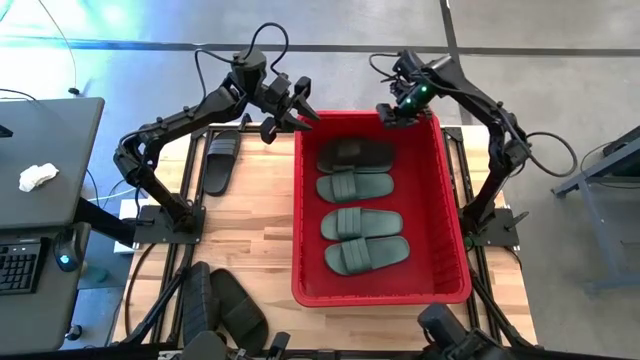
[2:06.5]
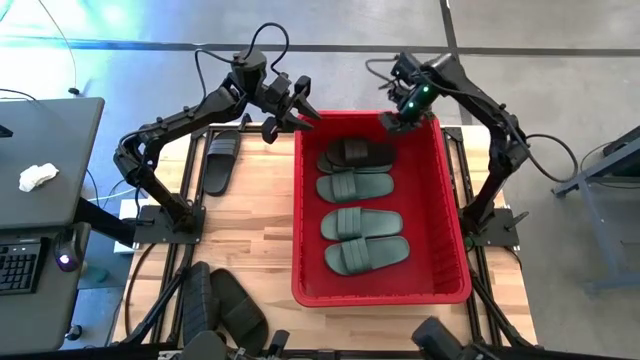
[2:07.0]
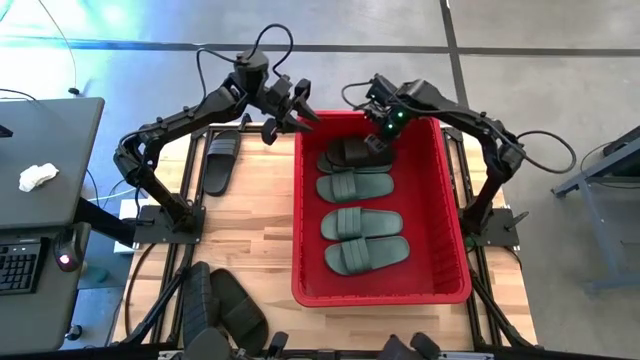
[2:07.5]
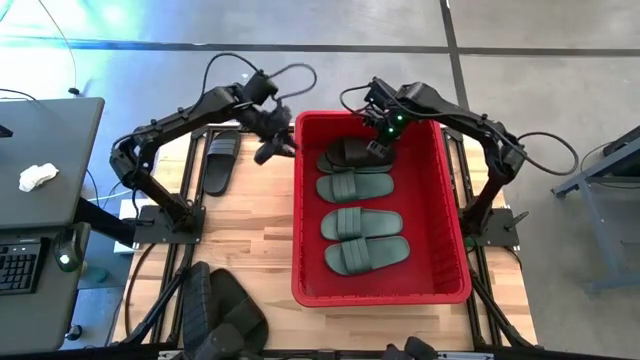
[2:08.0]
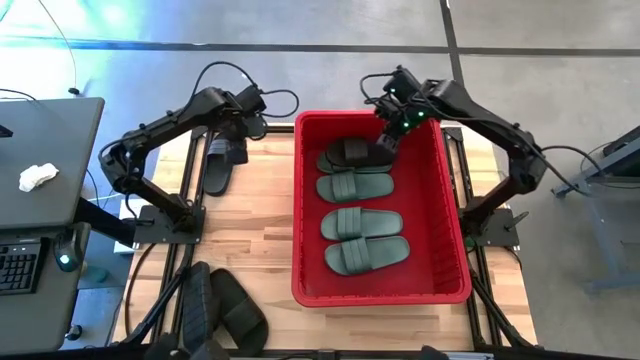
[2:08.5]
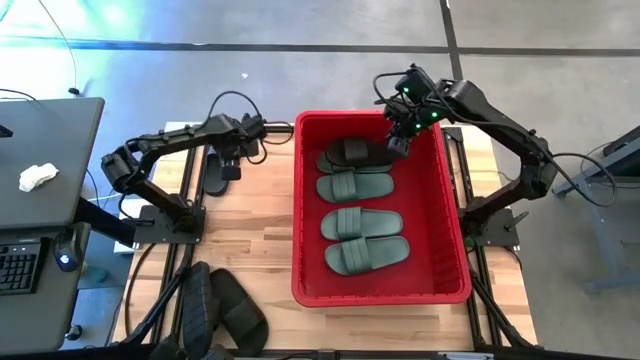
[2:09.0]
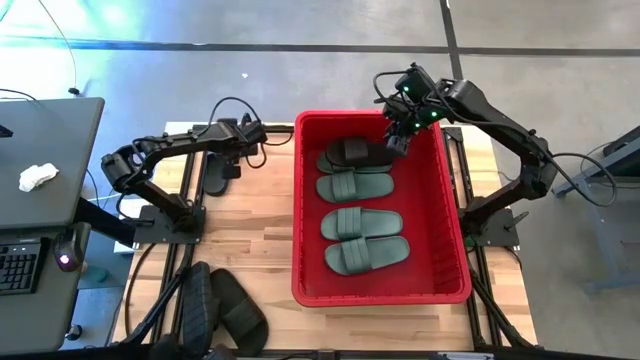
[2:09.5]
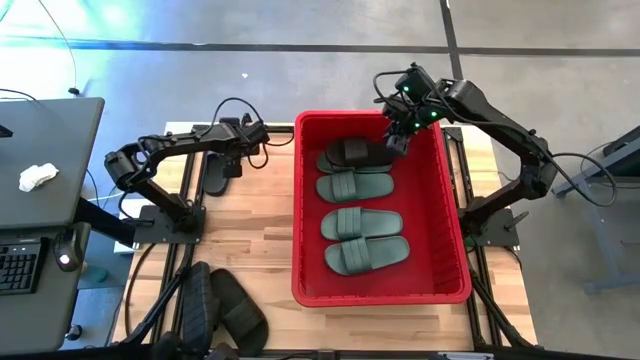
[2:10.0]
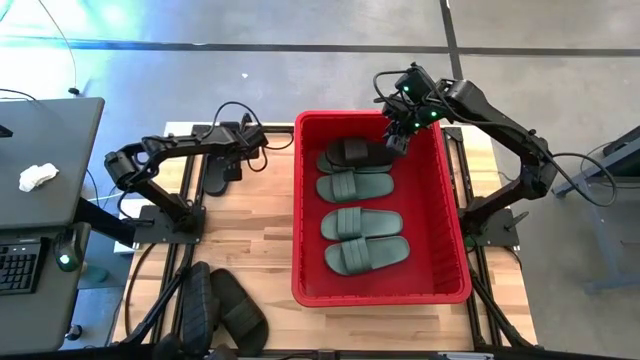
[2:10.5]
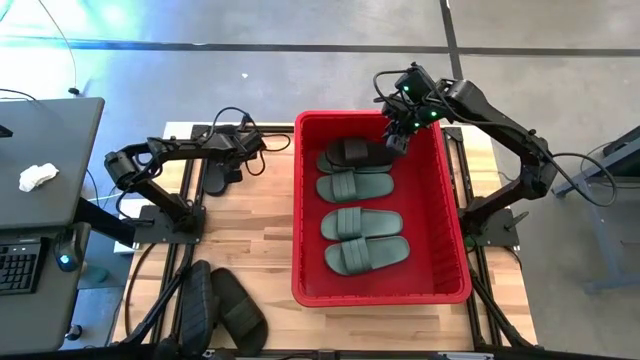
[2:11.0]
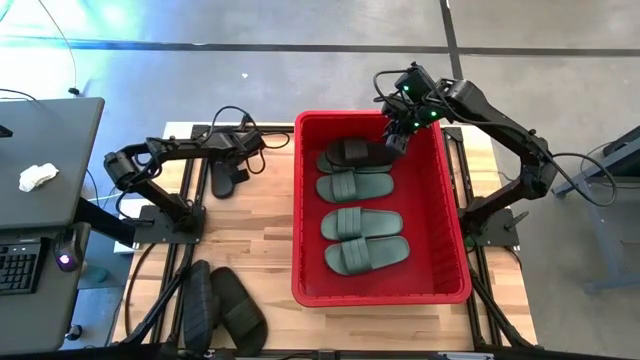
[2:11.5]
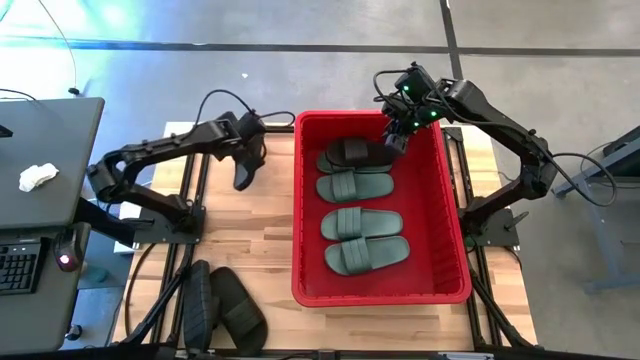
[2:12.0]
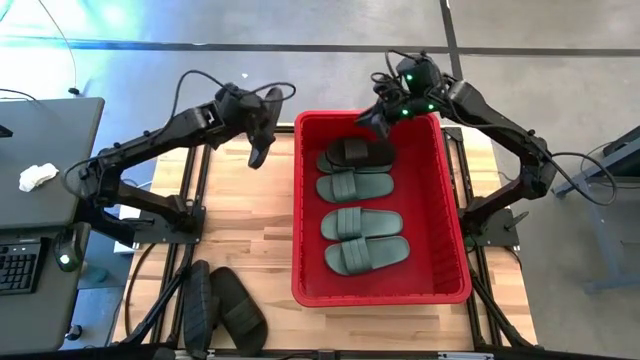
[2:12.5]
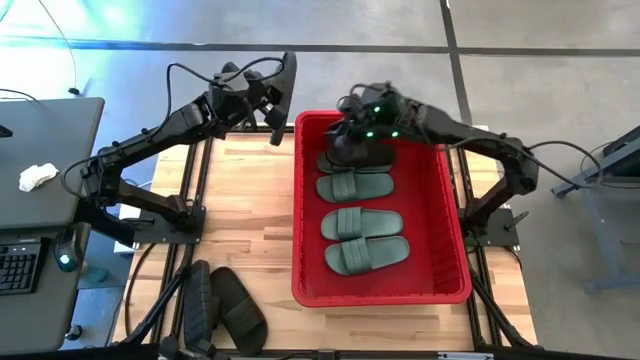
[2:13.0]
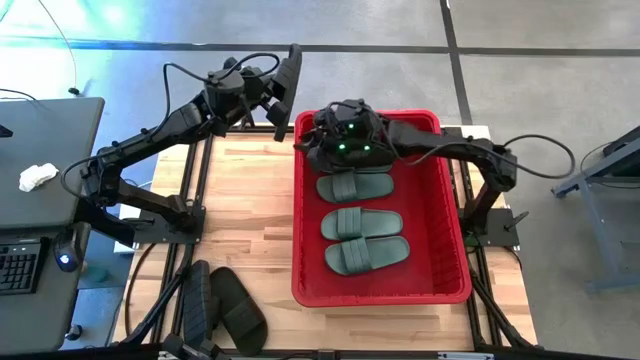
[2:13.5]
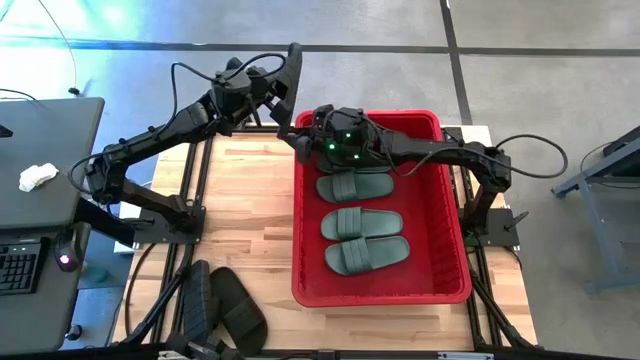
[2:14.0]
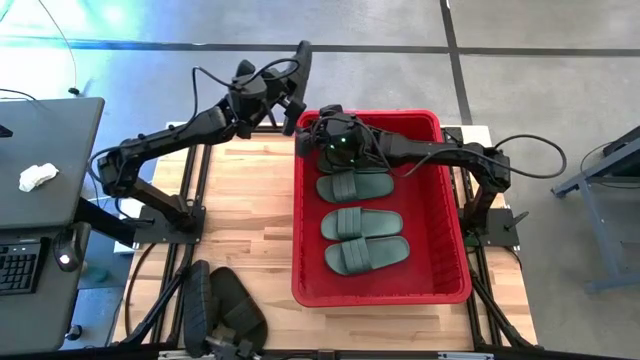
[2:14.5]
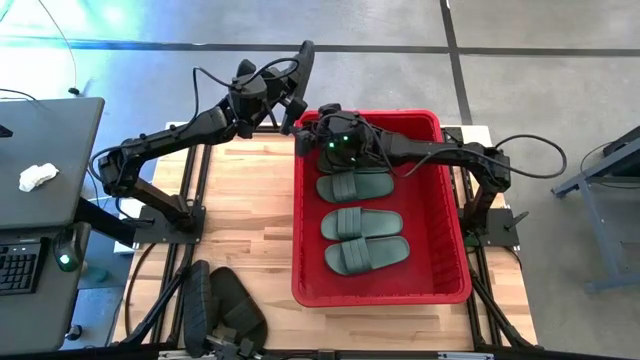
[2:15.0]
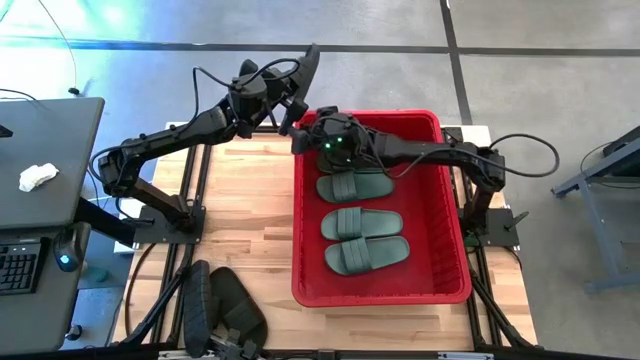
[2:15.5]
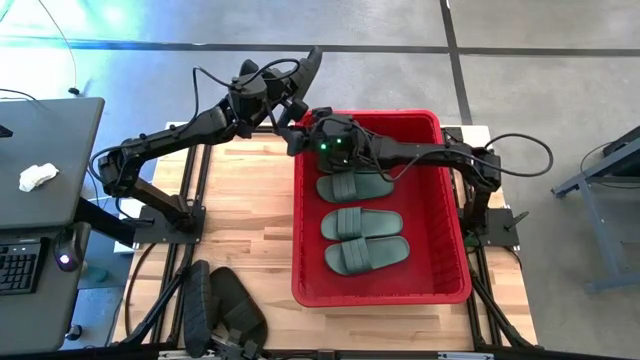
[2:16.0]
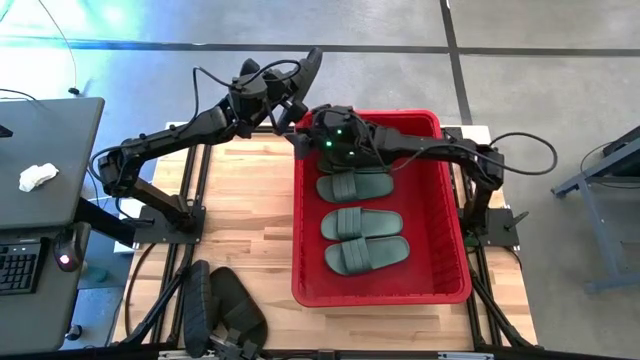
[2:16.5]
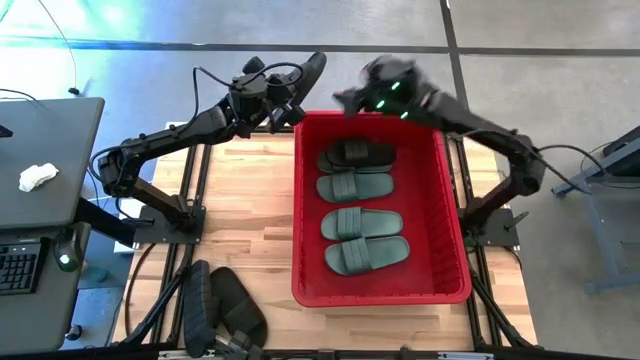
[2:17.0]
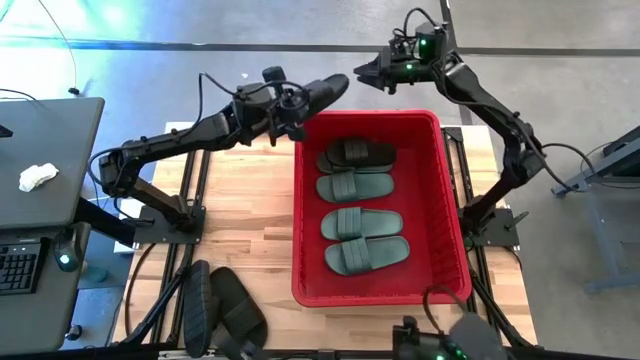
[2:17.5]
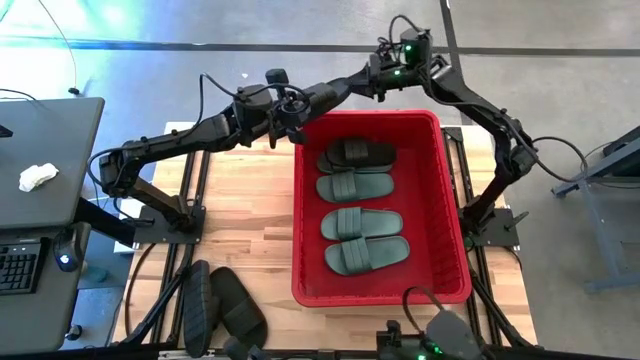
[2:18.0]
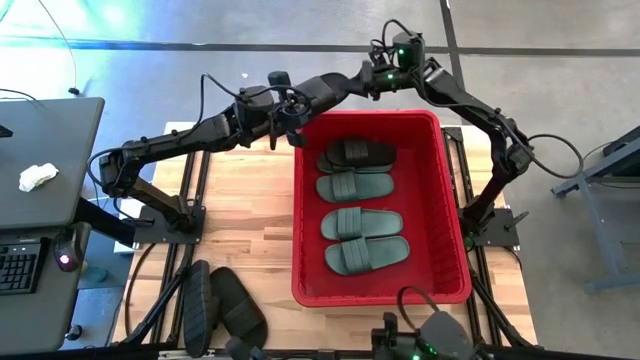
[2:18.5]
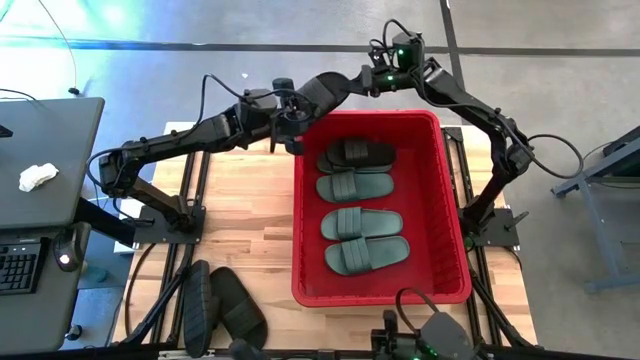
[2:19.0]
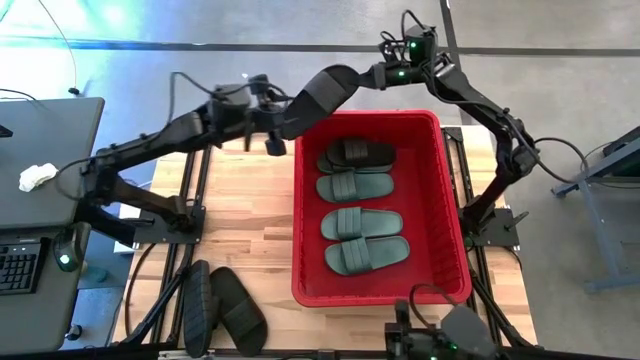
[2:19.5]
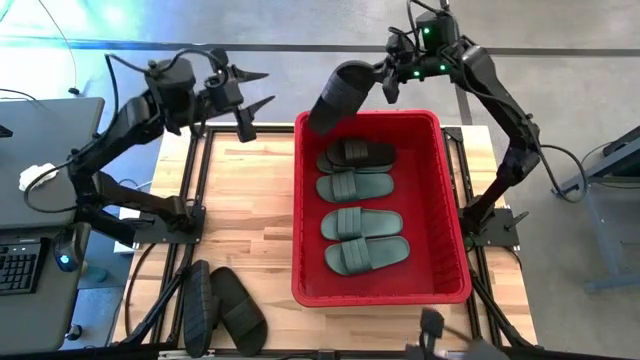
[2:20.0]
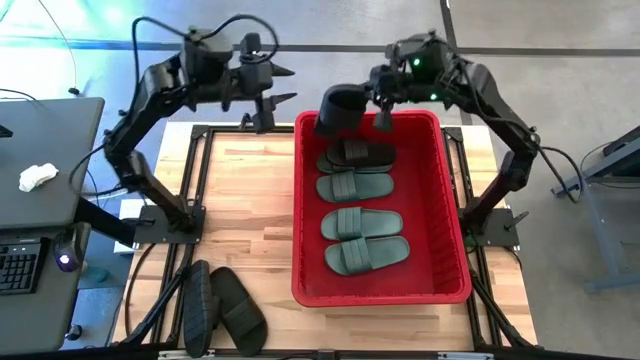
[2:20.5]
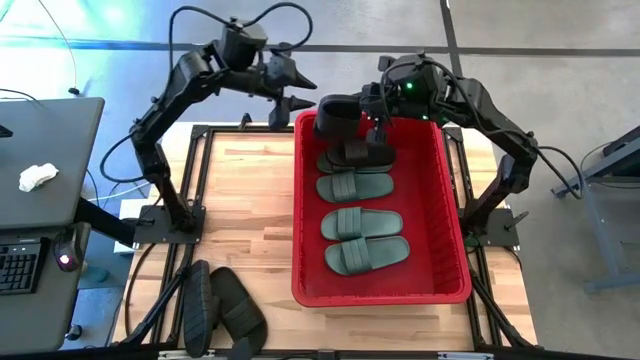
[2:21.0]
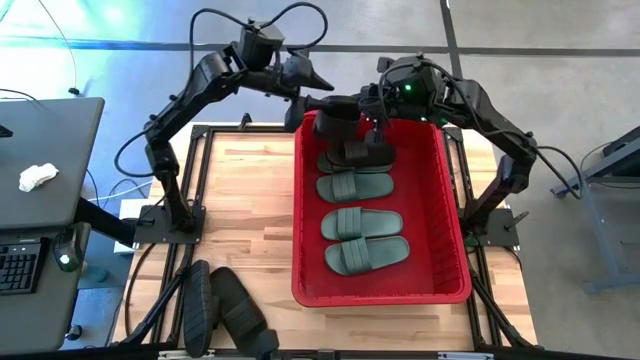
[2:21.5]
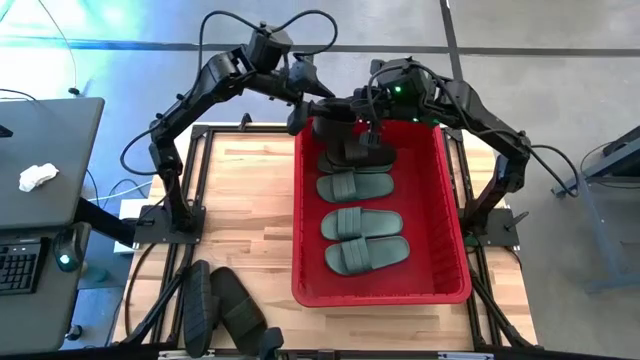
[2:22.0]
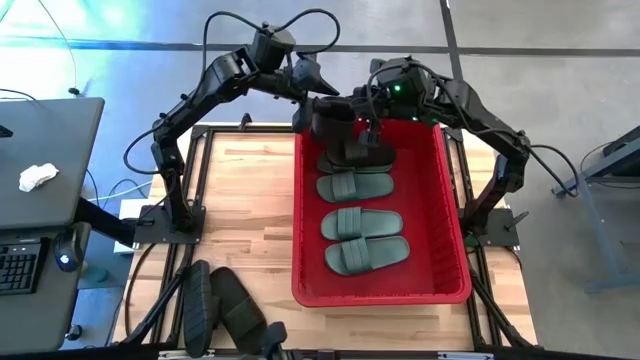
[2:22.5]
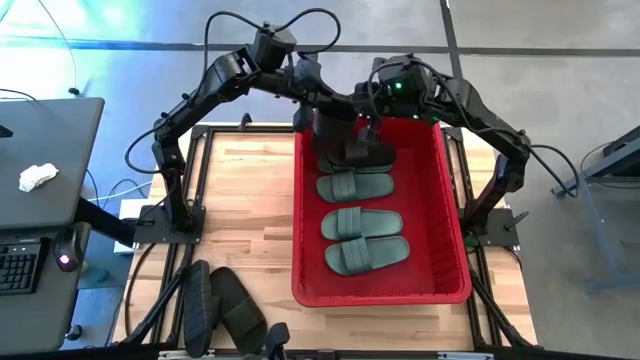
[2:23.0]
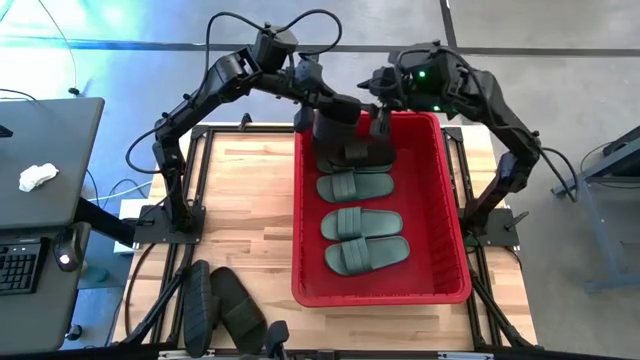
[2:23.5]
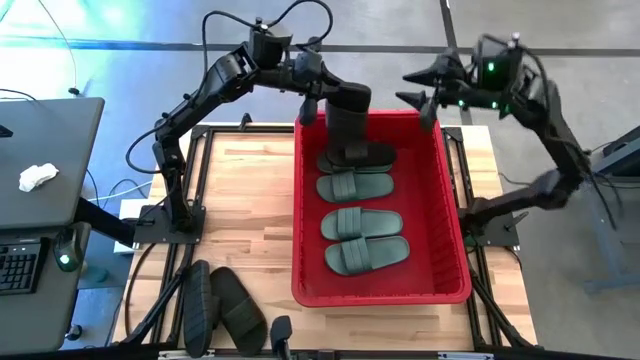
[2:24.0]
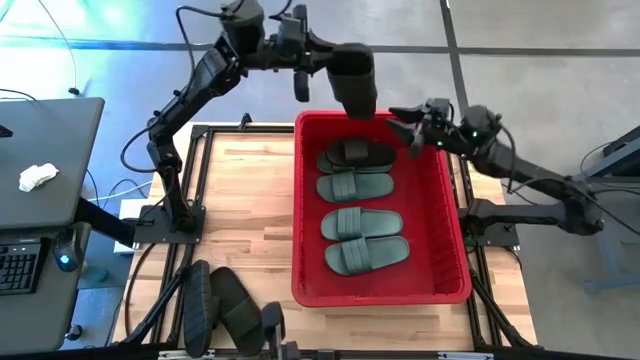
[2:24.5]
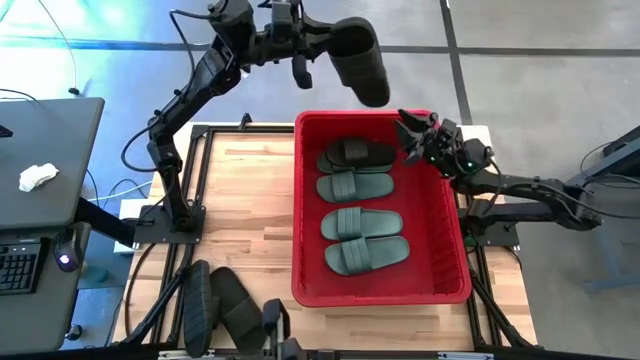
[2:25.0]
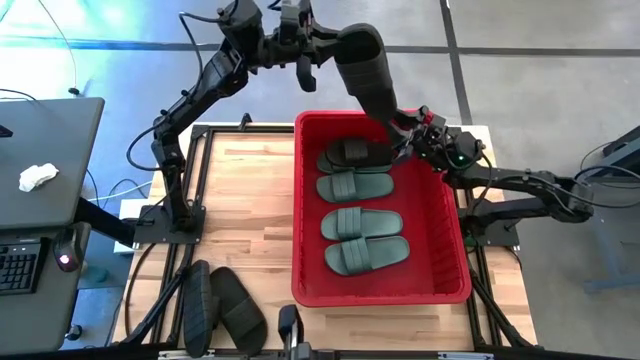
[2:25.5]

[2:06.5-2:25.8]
Task: Pick and place slides into bin
Put the black slide into the red container

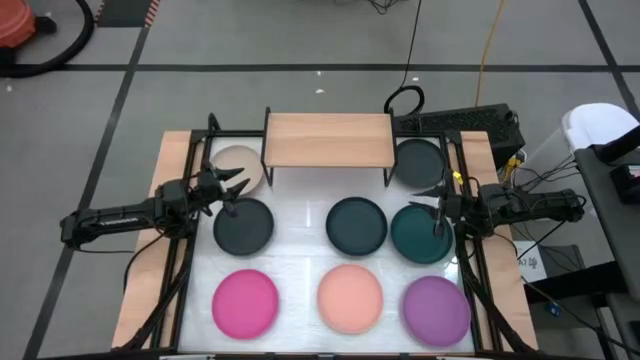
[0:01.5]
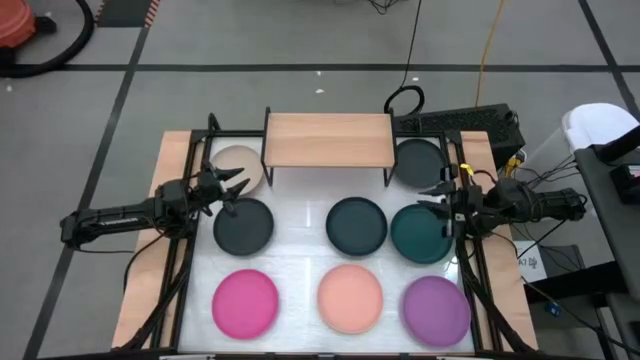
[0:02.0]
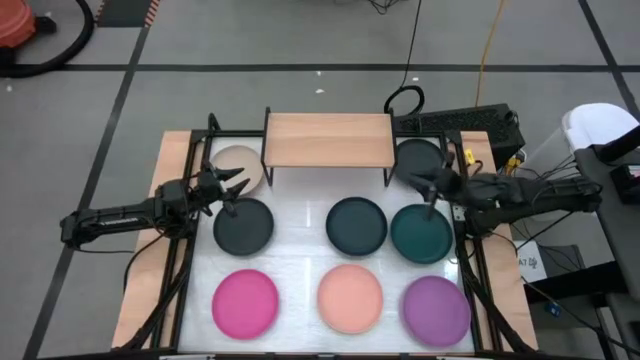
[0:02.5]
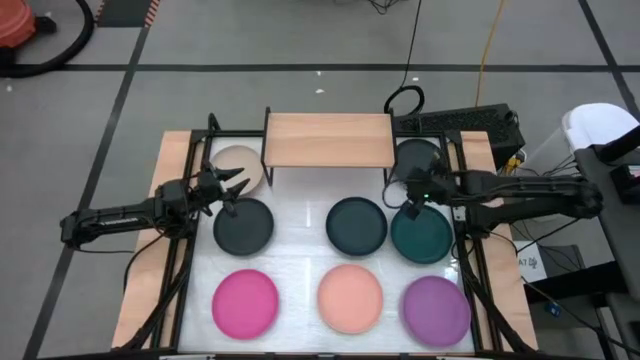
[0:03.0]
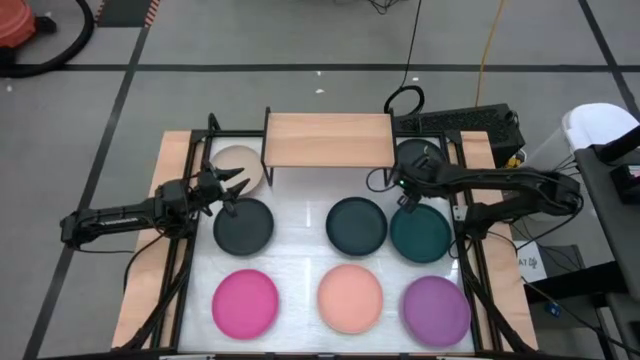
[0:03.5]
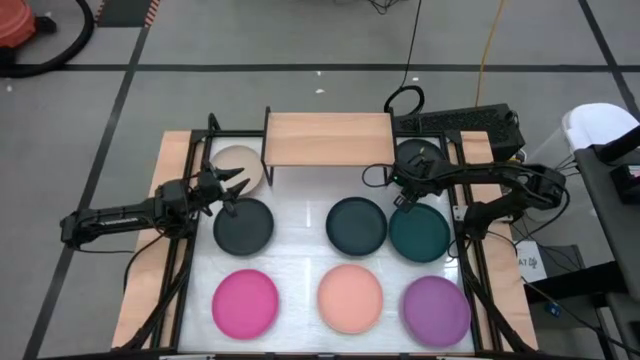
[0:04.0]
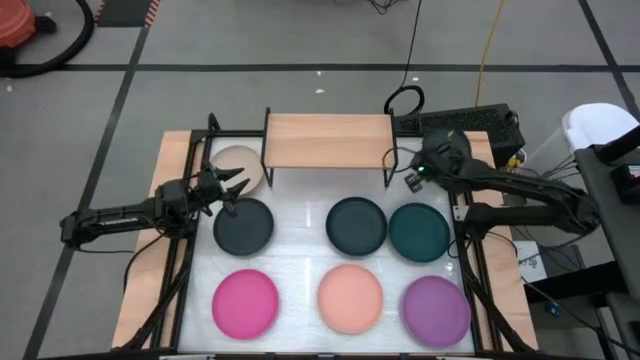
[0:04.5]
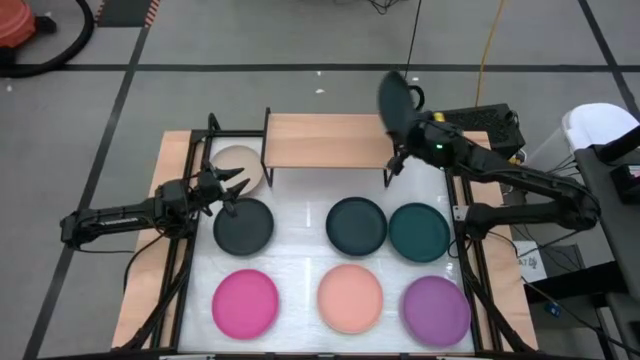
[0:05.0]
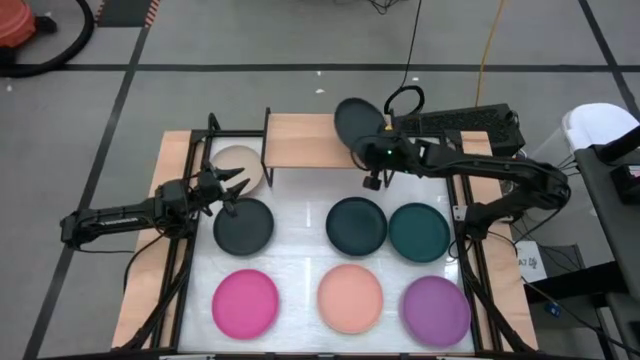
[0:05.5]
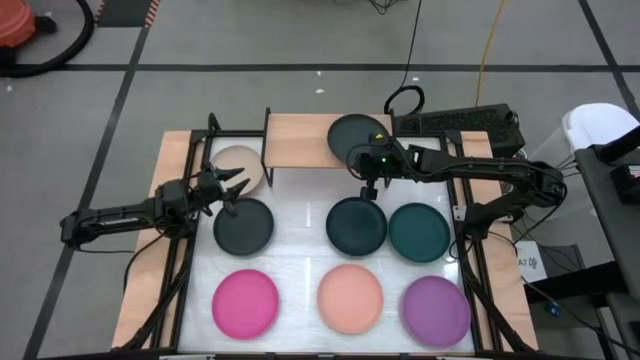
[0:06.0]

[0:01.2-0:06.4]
Task: Place and stack plates onto a shelf
Put the black plate on the shelf
